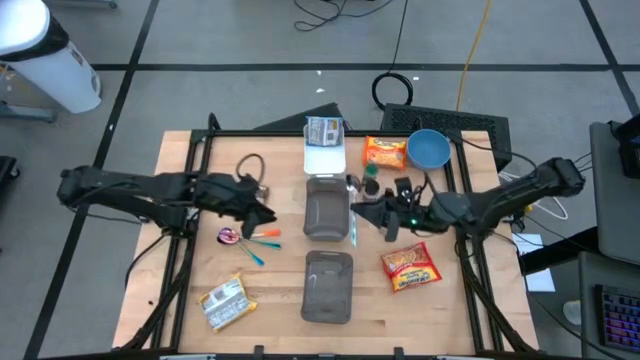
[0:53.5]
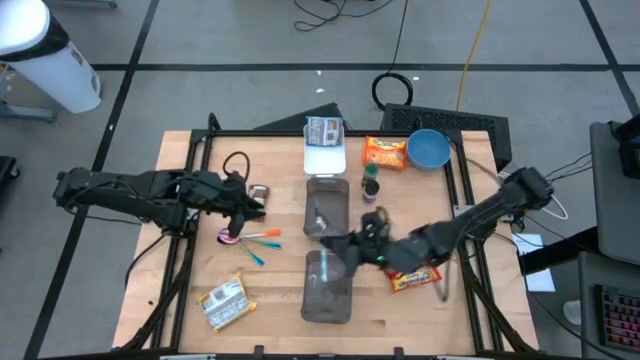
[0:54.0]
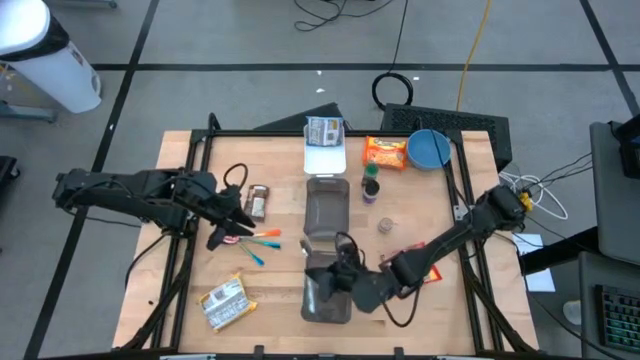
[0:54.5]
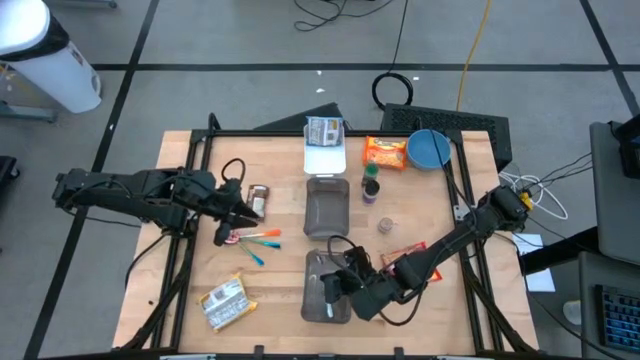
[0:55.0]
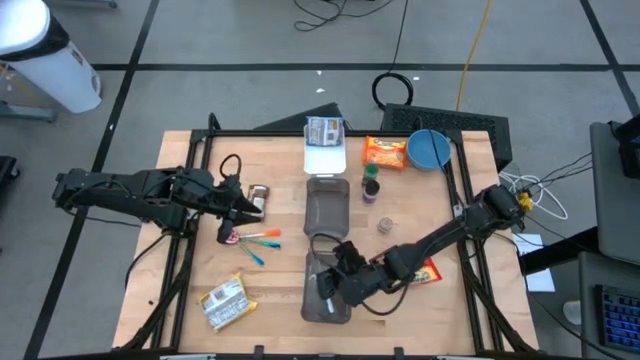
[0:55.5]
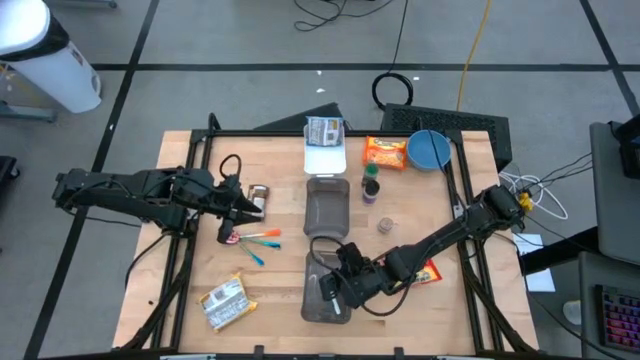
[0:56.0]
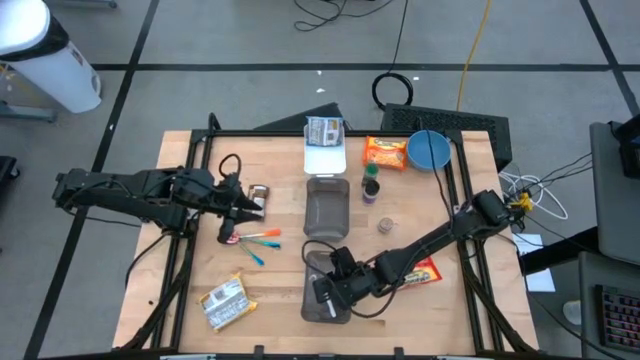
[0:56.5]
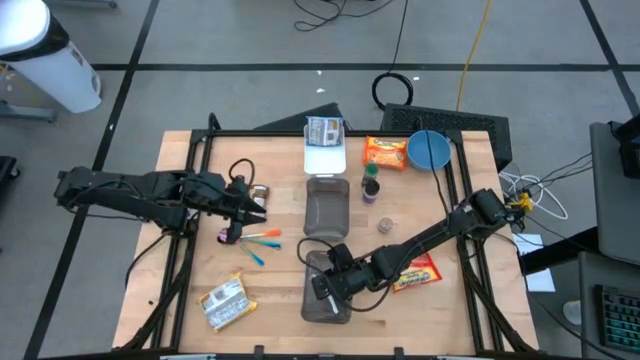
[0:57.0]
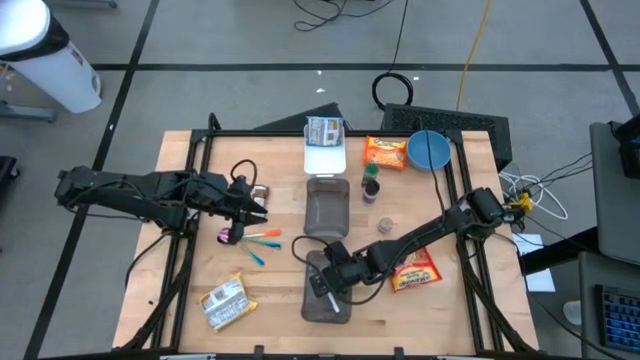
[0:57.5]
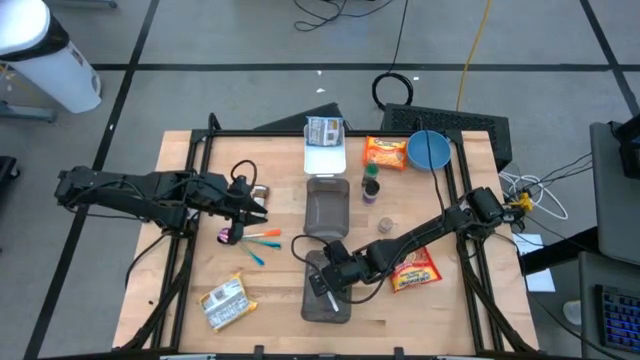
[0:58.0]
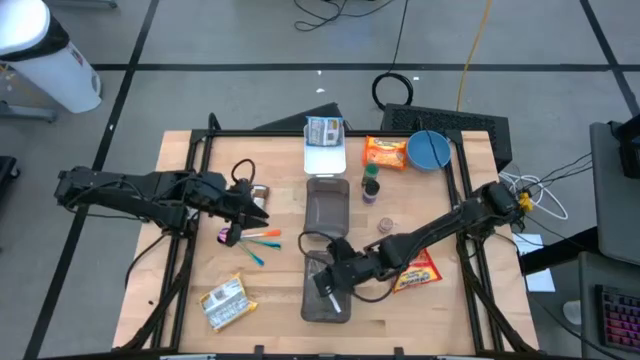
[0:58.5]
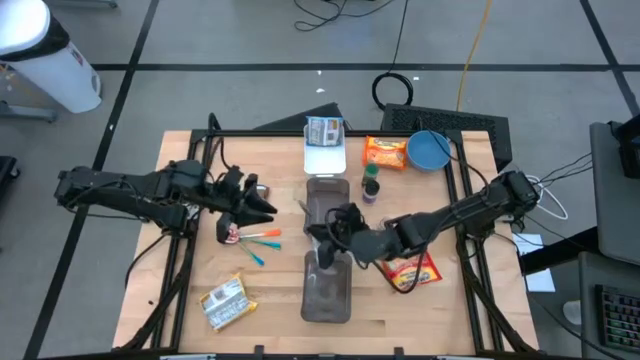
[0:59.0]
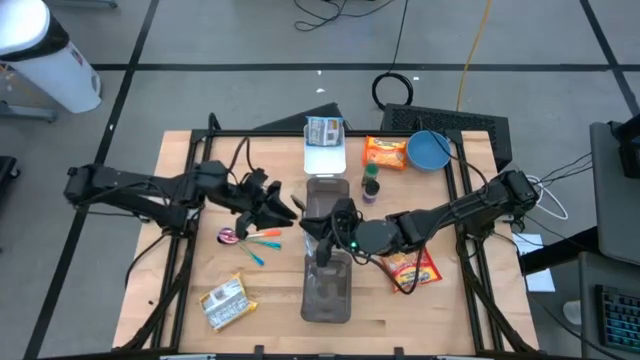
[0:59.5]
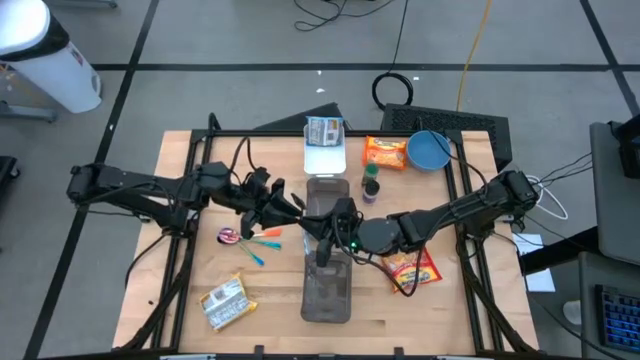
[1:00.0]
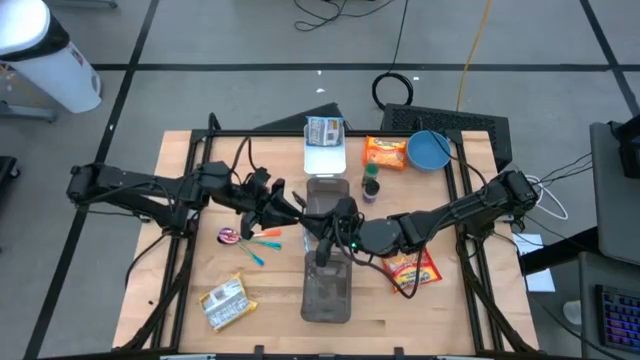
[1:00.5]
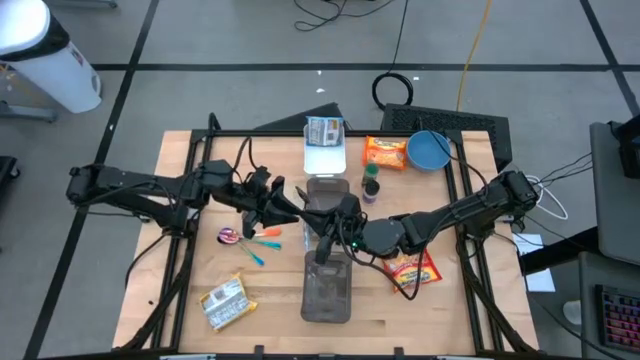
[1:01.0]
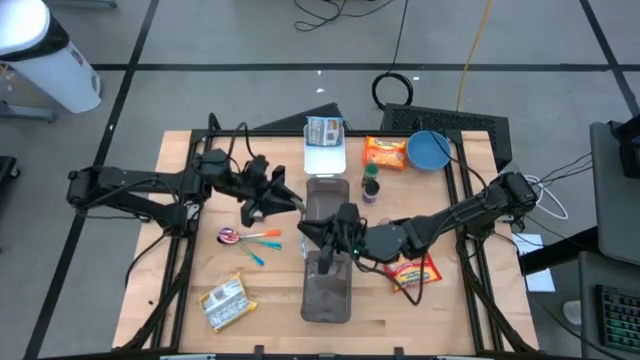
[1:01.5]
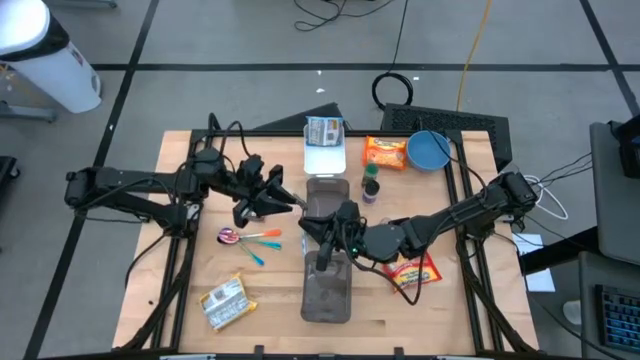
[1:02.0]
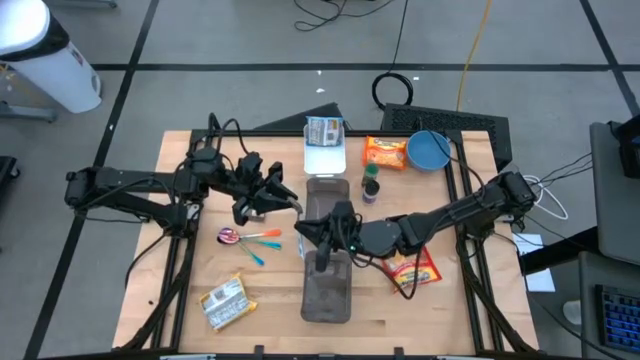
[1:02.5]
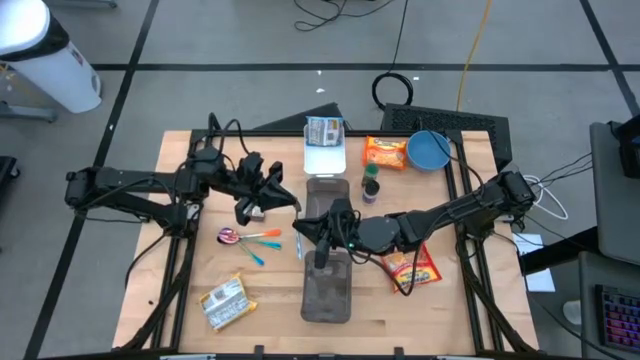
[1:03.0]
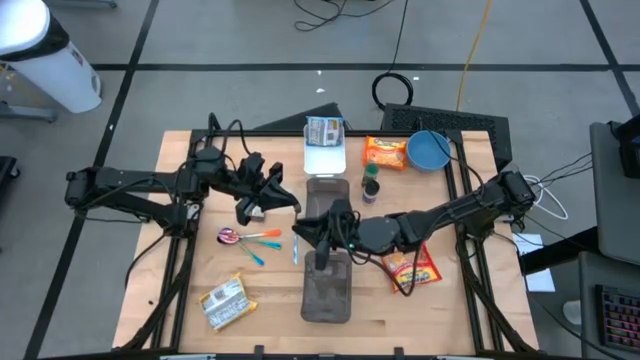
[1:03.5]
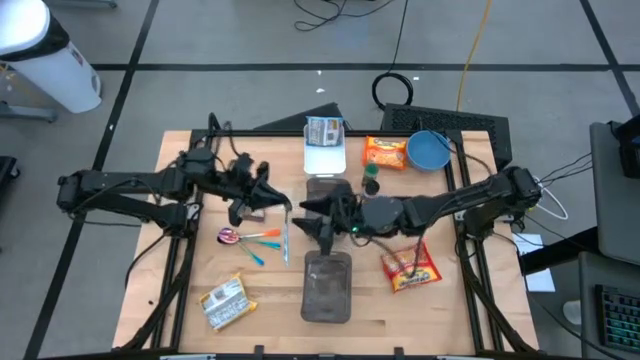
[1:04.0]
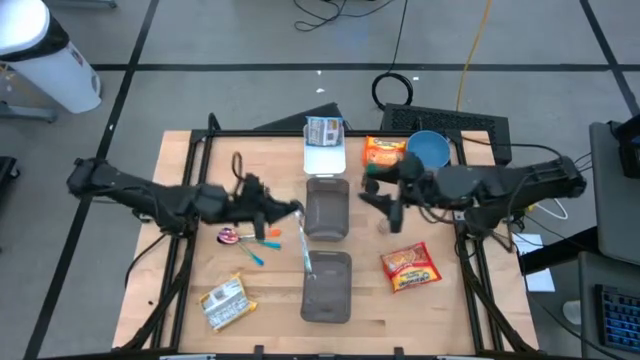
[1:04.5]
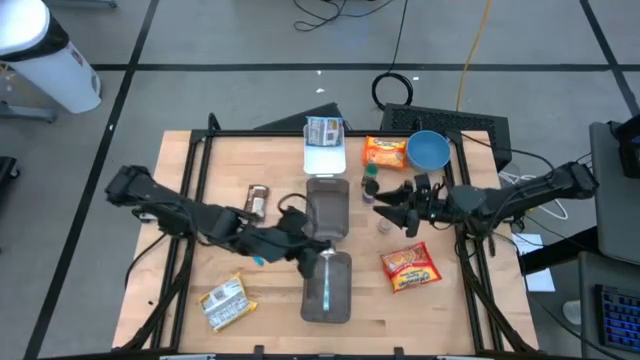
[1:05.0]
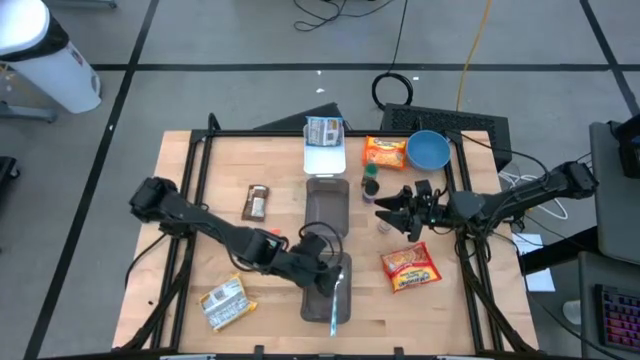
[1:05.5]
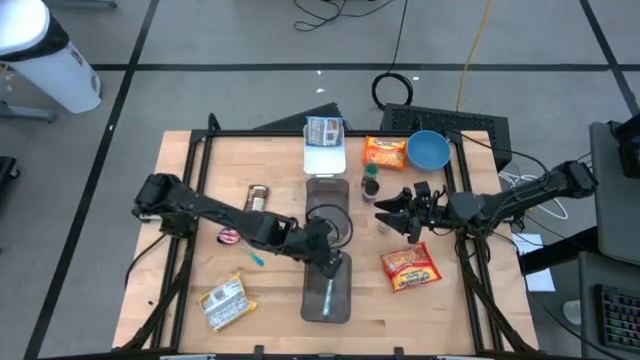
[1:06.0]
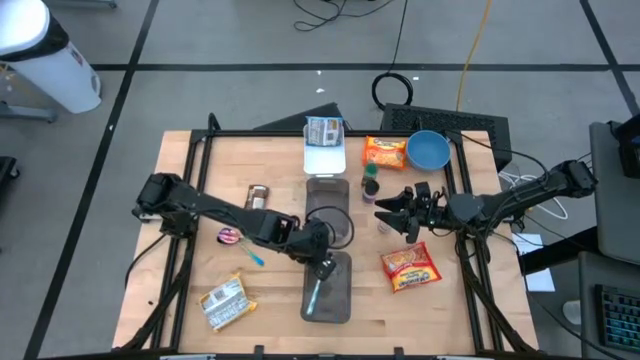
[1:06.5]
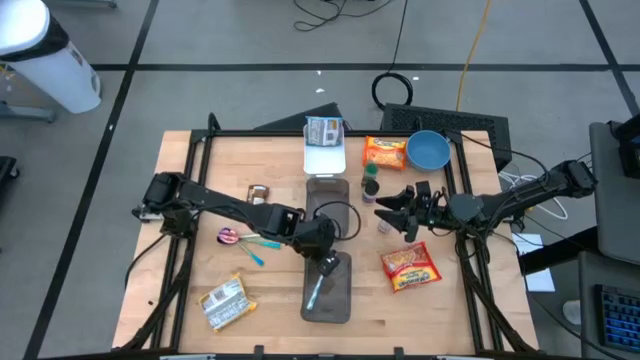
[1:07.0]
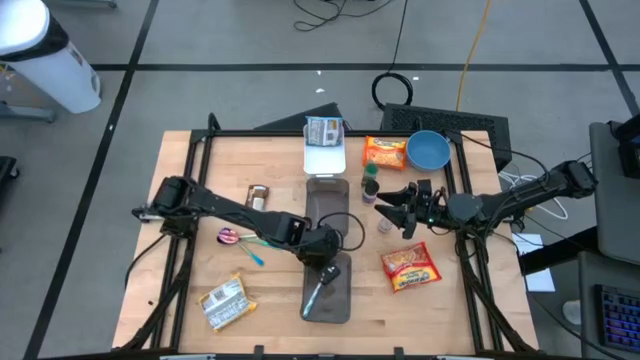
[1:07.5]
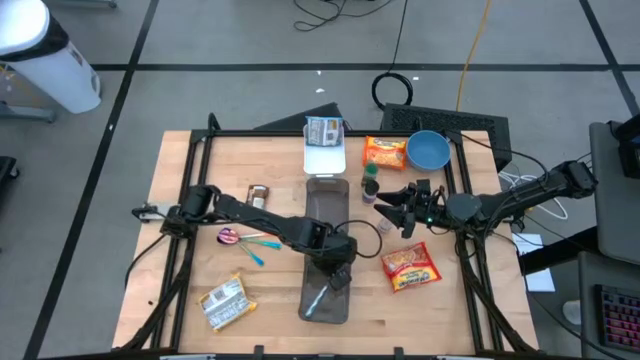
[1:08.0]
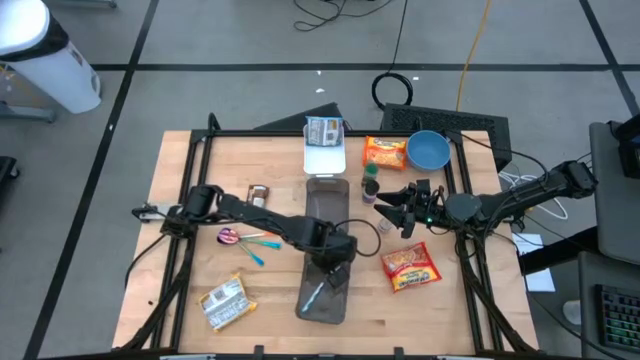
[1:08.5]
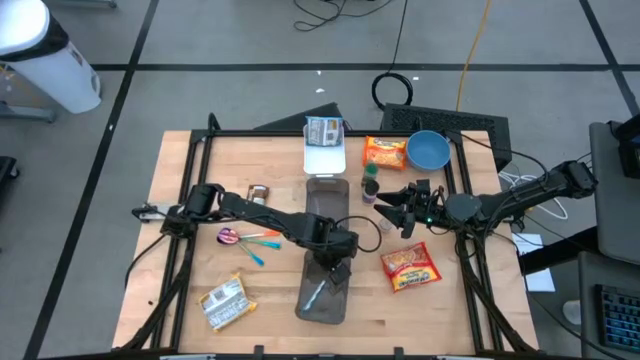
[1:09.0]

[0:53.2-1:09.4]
Task: Pick & Place Food Item
Put the blue patterned spoon into the bottom black bin

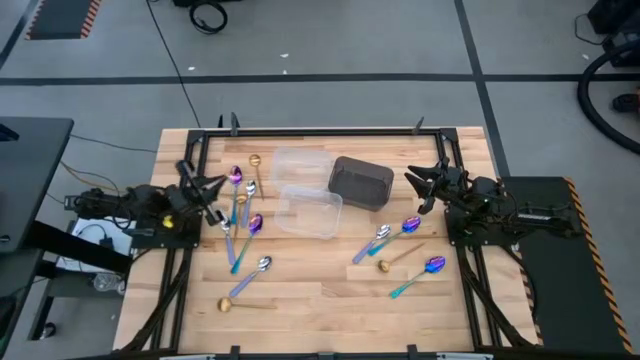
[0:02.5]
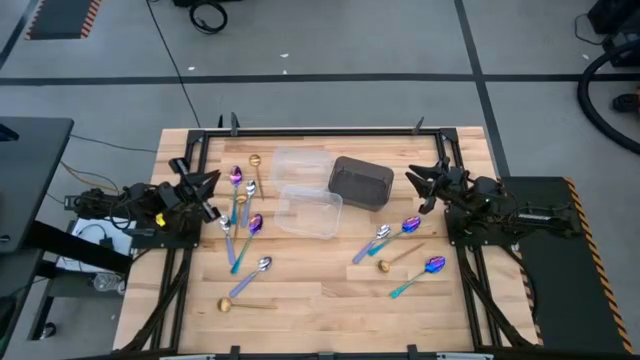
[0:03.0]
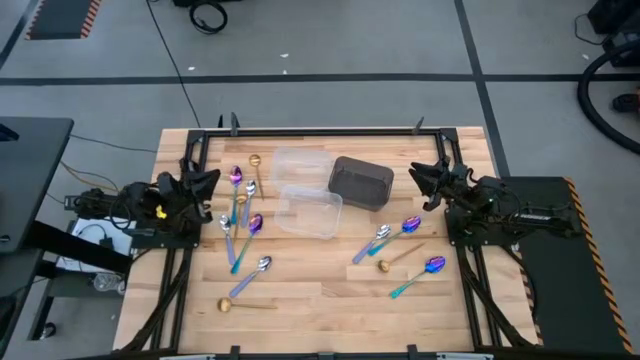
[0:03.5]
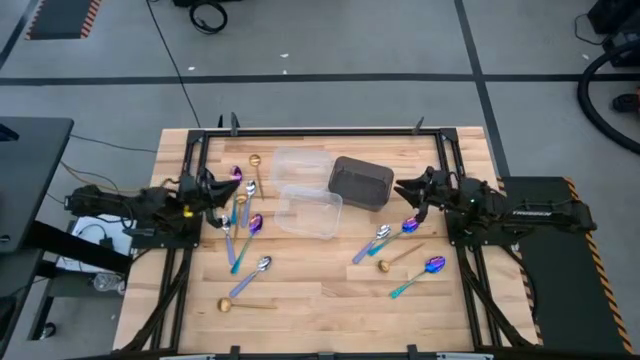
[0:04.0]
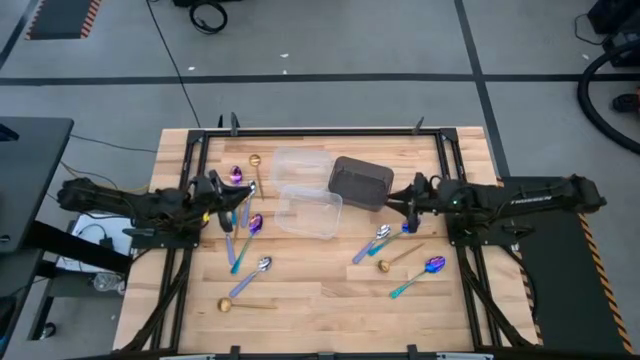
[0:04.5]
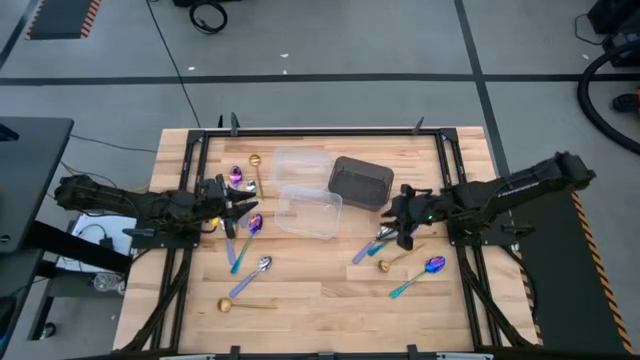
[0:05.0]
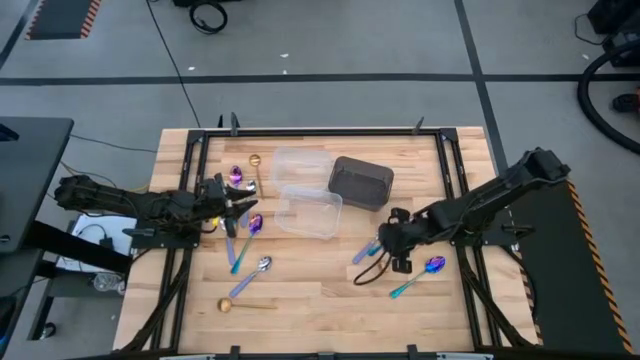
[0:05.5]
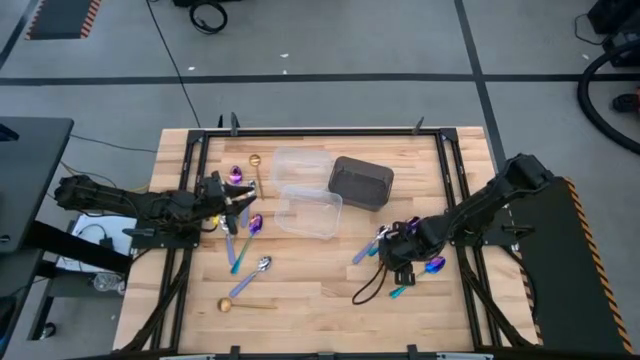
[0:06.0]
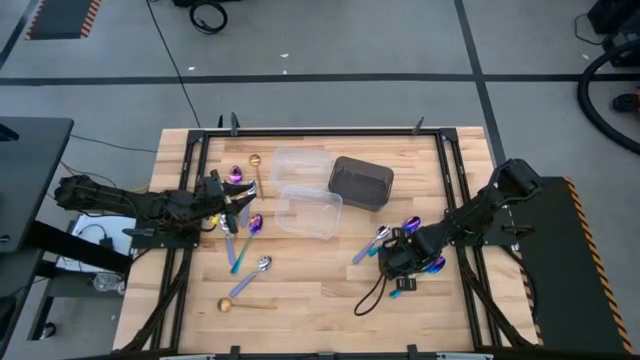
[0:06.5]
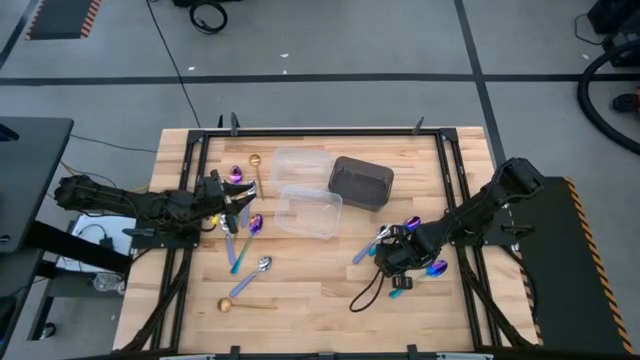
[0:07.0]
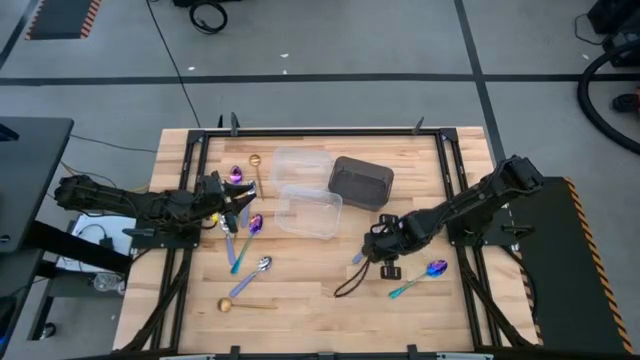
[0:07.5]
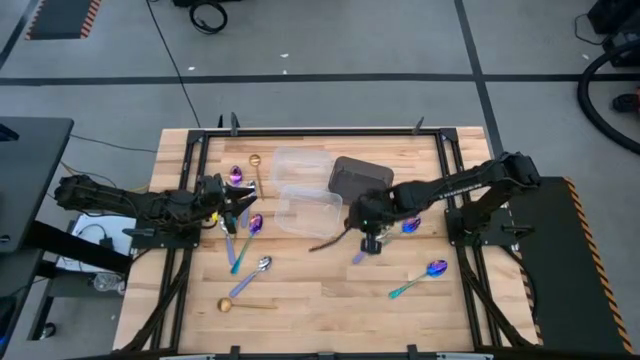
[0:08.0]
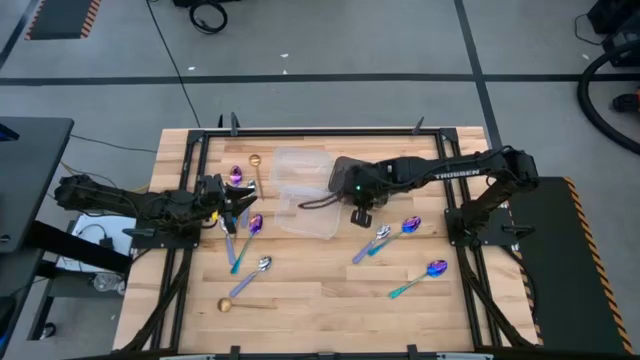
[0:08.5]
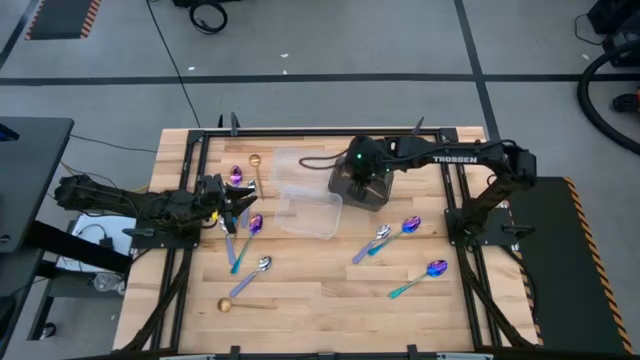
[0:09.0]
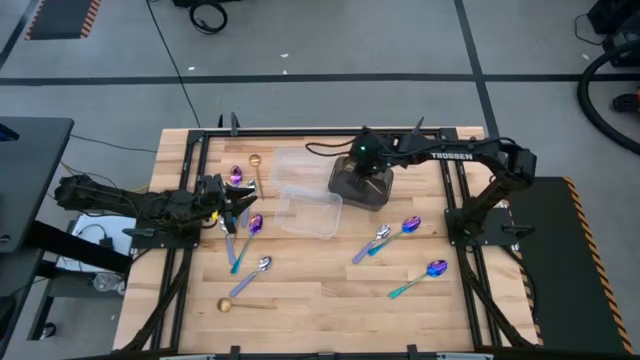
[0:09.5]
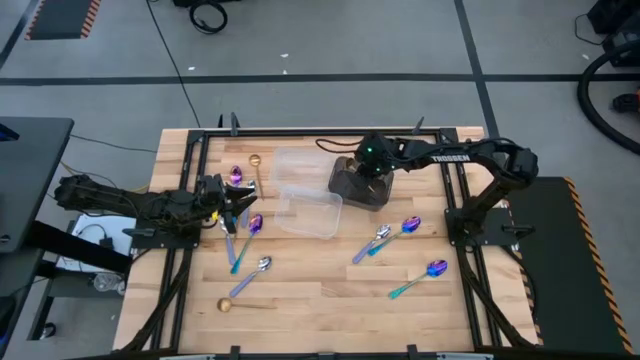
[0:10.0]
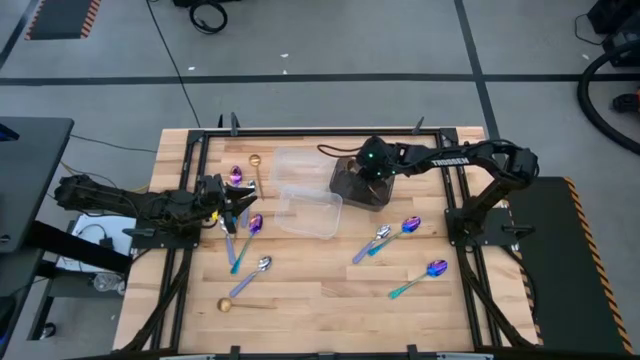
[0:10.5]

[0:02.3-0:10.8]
Task: Sort silverware by color (type)
Put the gold spoon into the black bin
